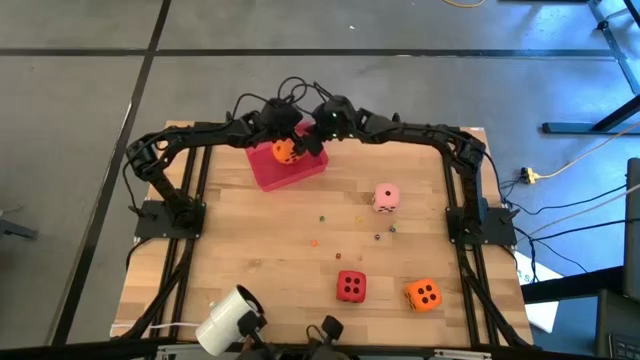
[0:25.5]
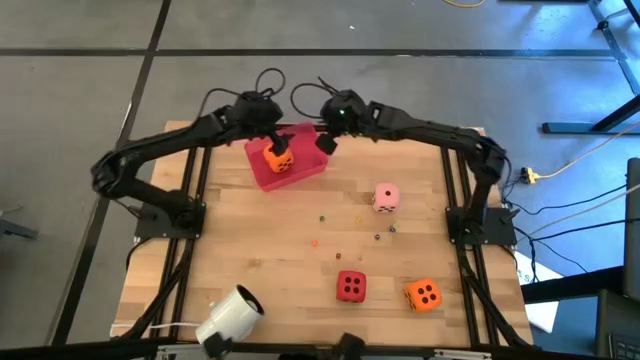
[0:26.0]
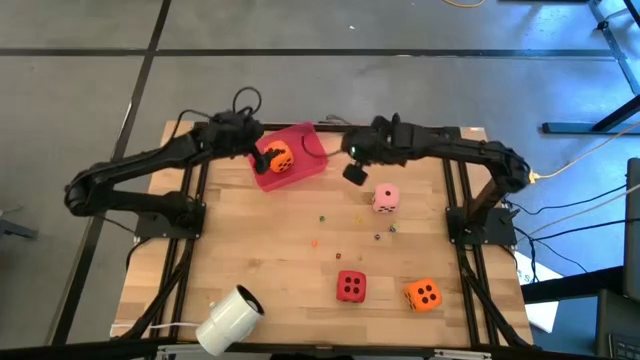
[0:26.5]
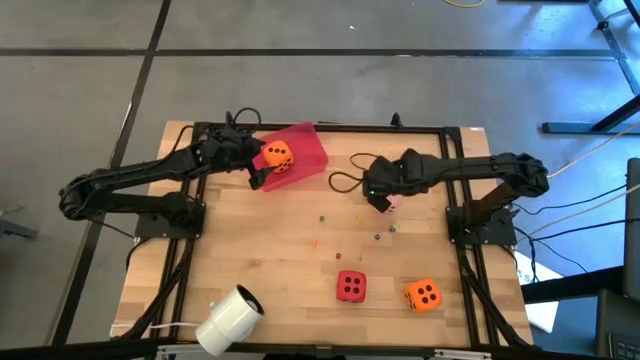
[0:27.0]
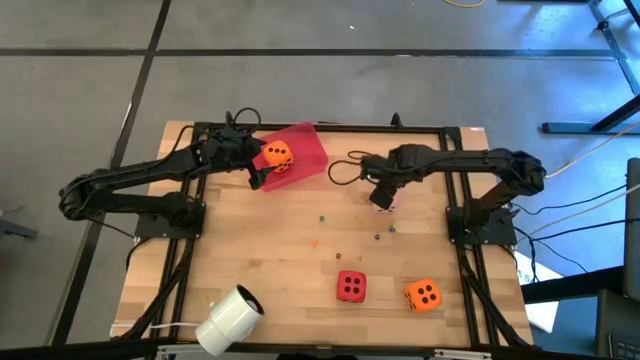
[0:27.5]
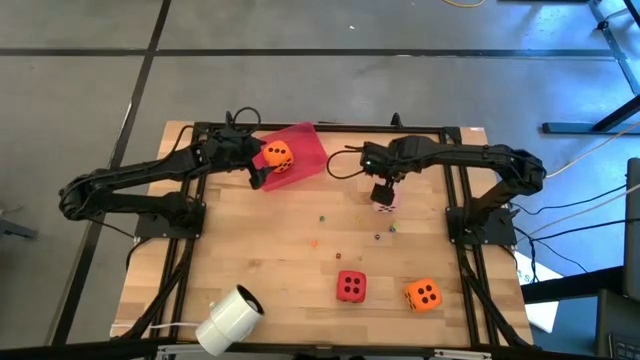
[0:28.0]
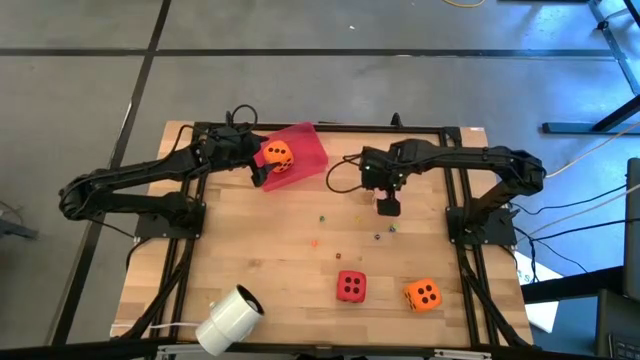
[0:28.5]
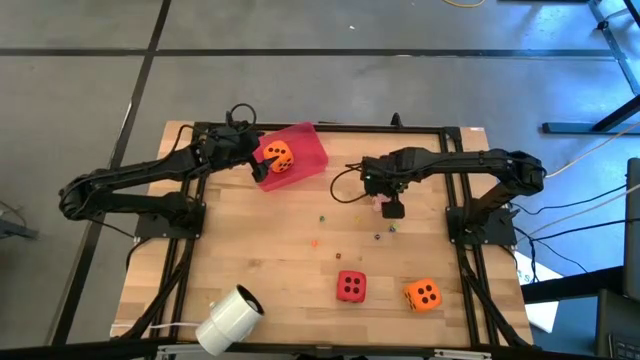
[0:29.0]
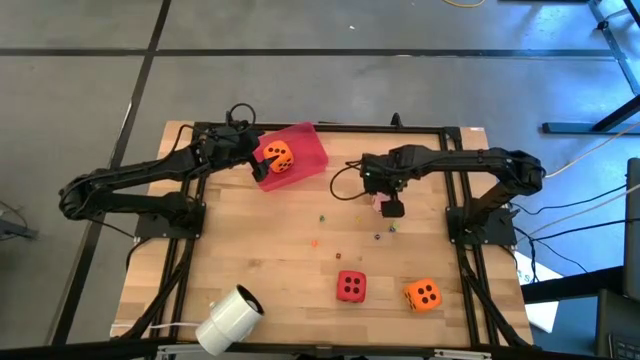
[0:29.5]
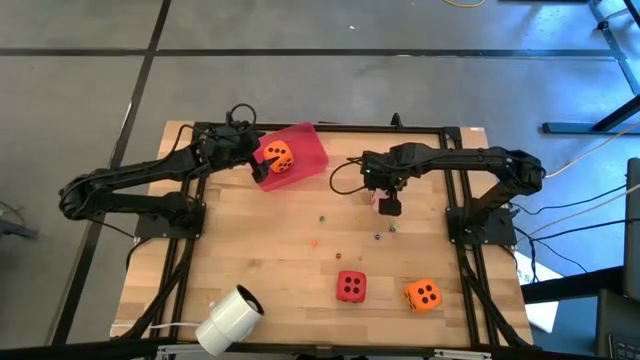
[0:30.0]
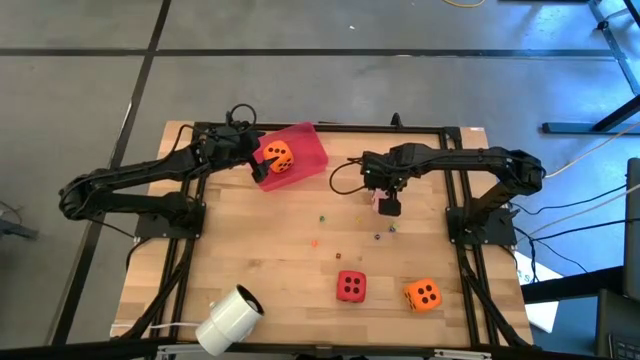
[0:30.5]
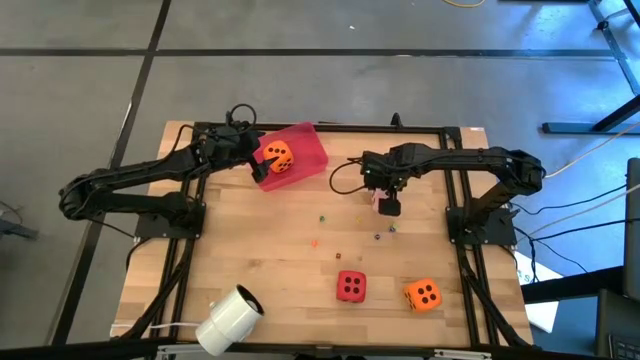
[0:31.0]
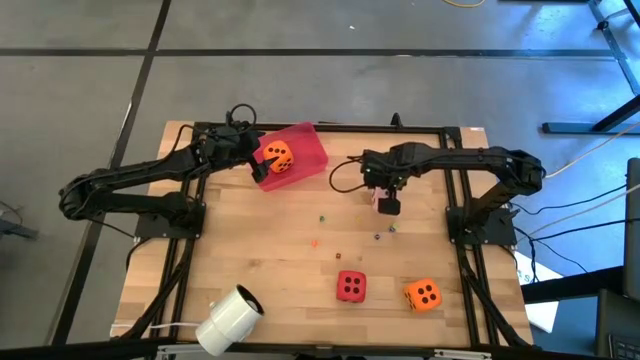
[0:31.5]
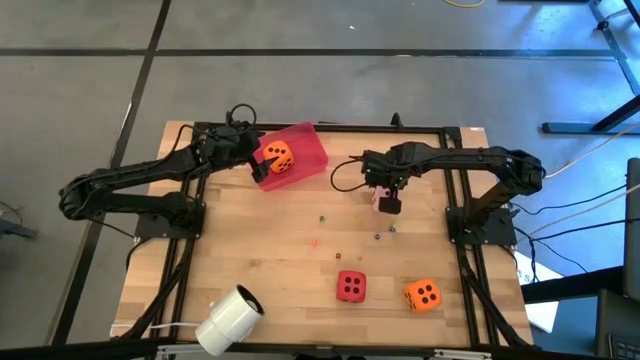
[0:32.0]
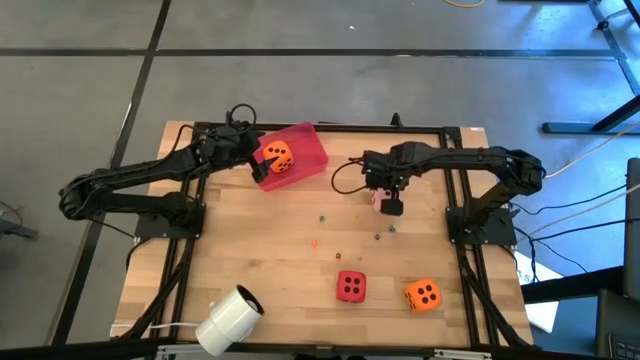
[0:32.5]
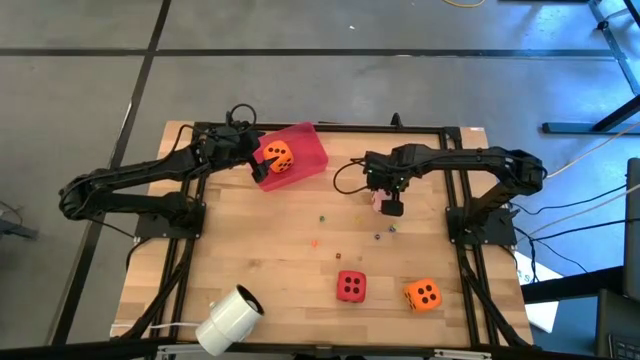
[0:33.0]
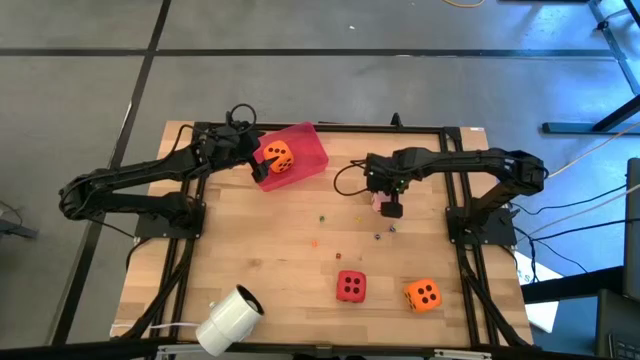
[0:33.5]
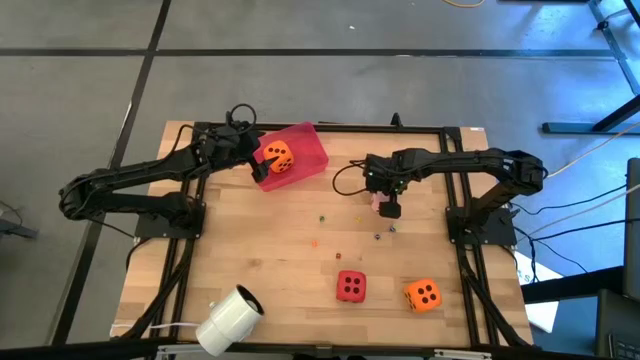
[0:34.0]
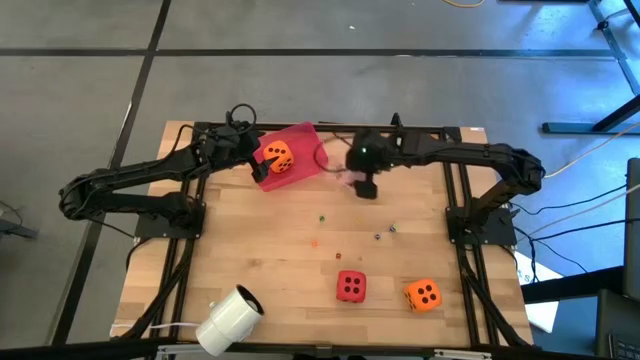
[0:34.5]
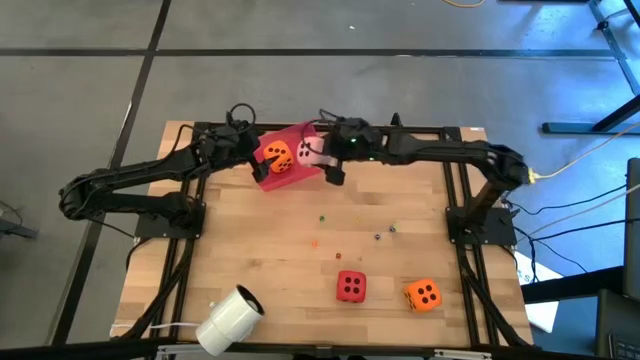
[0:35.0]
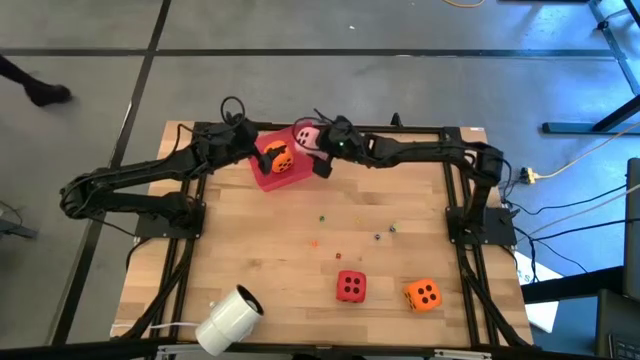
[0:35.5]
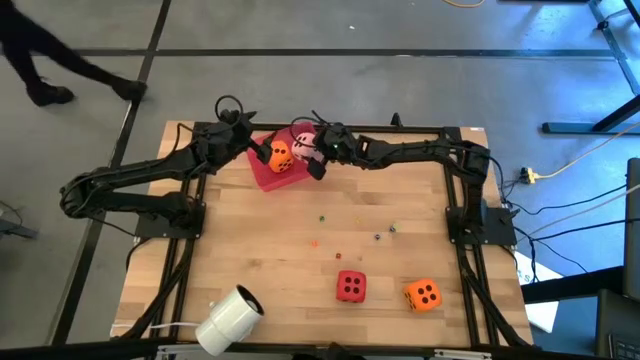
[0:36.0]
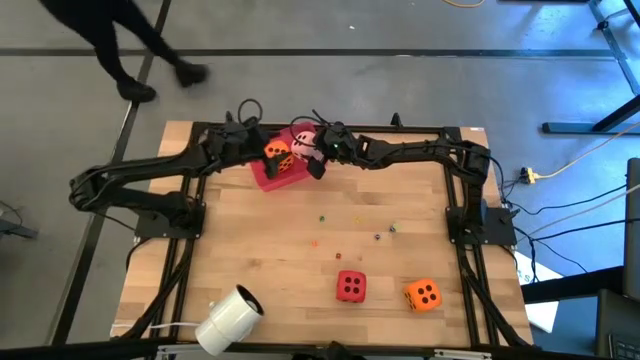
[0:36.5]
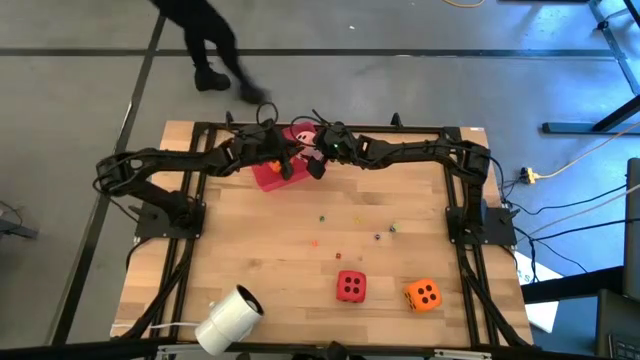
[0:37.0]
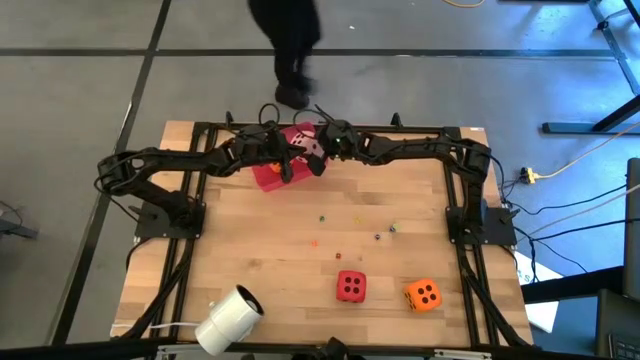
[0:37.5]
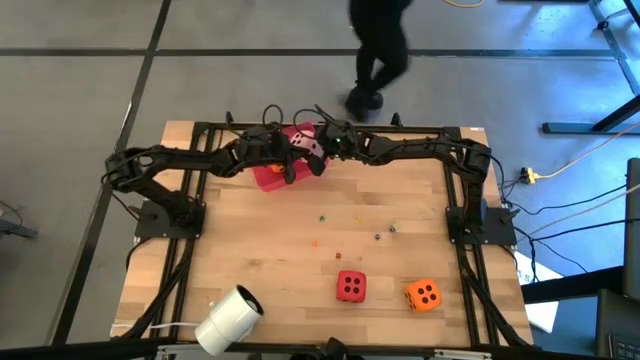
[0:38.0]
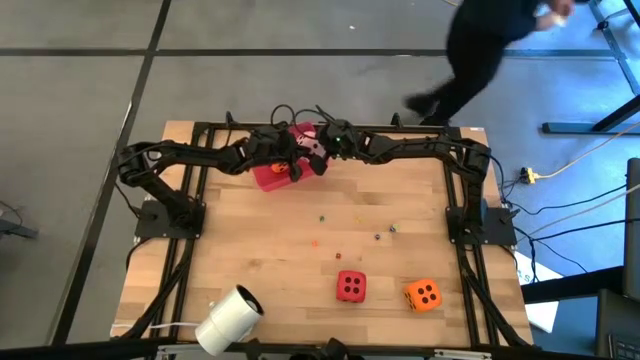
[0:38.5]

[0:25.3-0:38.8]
Task: Pick & Place Dice
Put the large pink die into the red bin

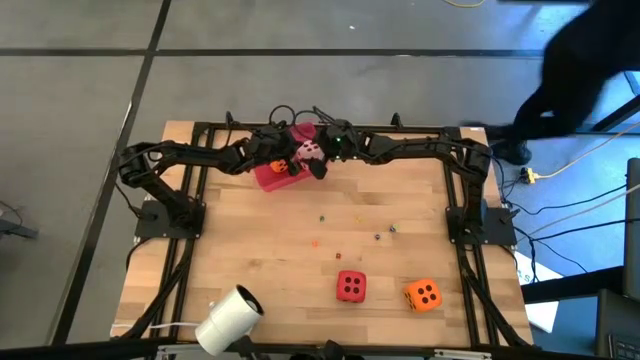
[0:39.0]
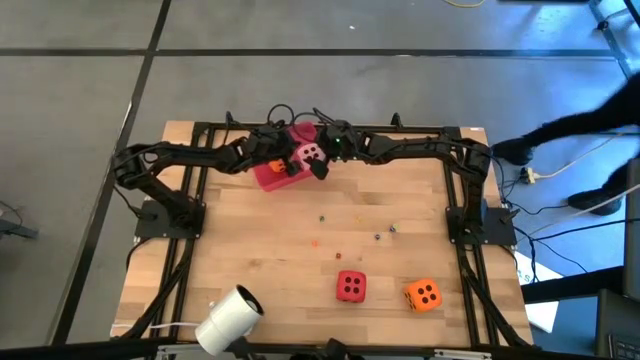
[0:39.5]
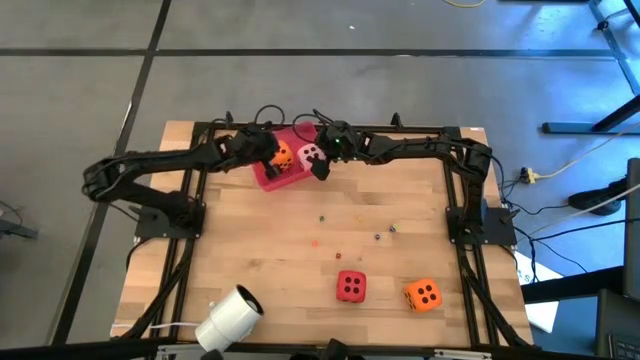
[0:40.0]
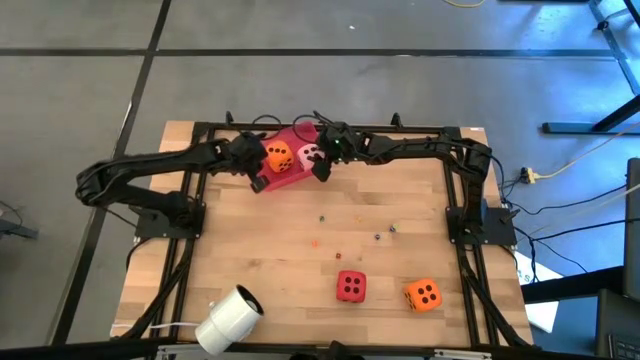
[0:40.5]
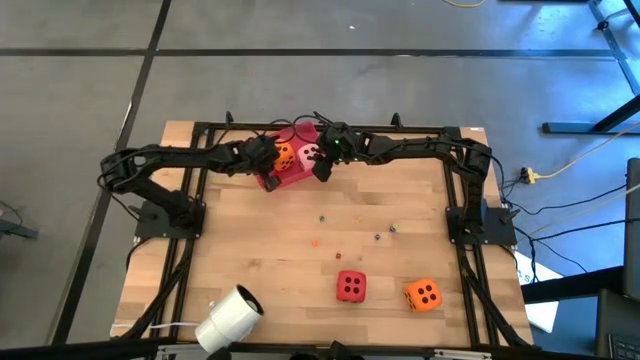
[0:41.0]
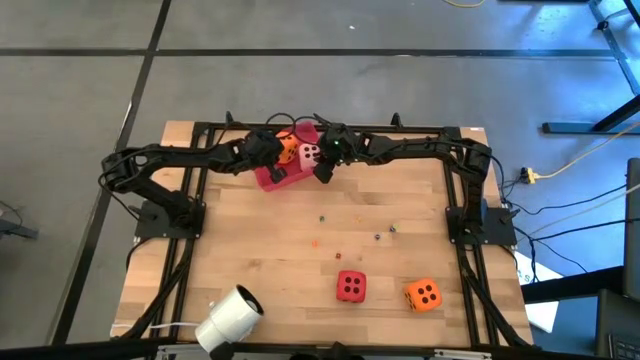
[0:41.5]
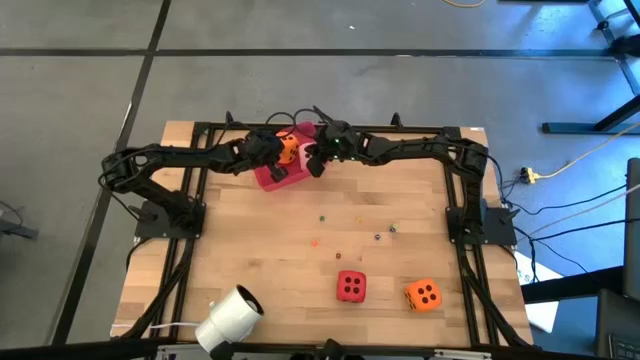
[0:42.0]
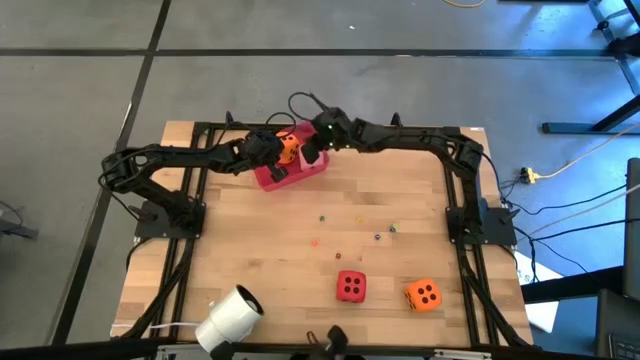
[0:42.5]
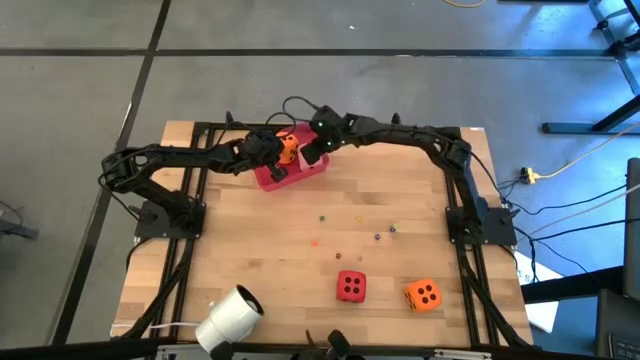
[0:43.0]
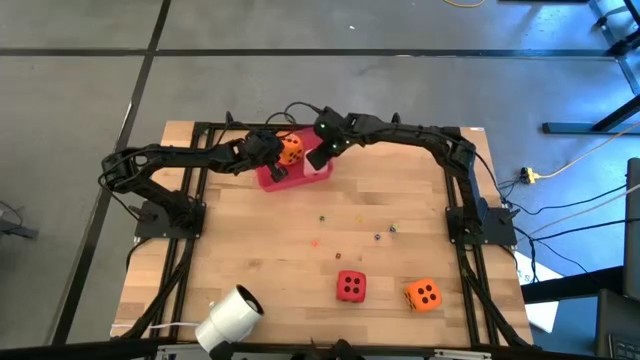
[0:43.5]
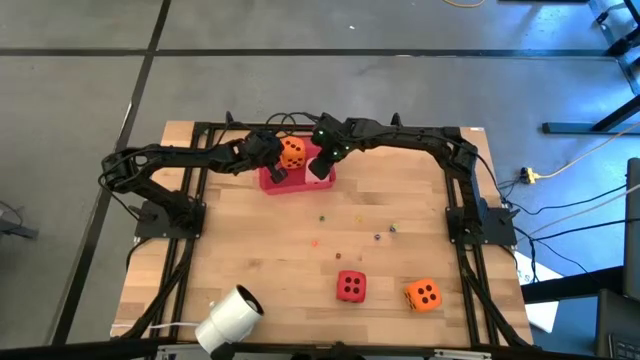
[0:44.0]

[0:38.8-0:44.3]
Adjust the large orange die in the red bin

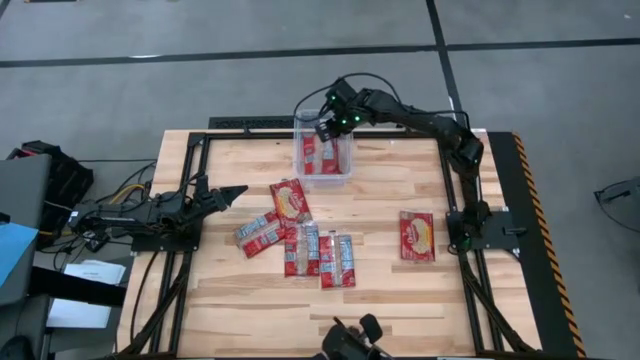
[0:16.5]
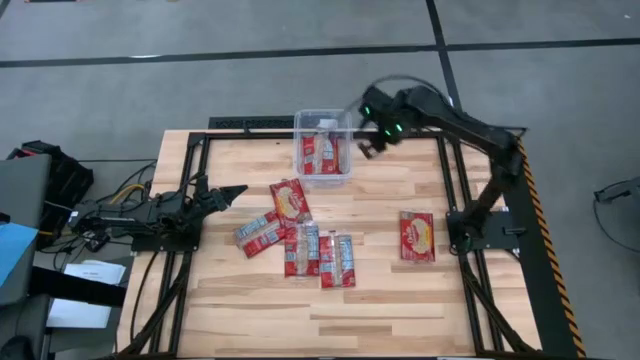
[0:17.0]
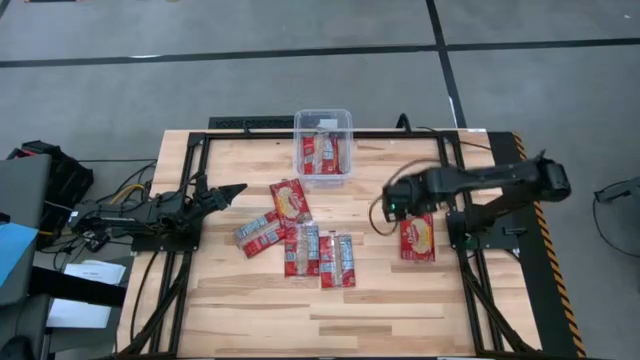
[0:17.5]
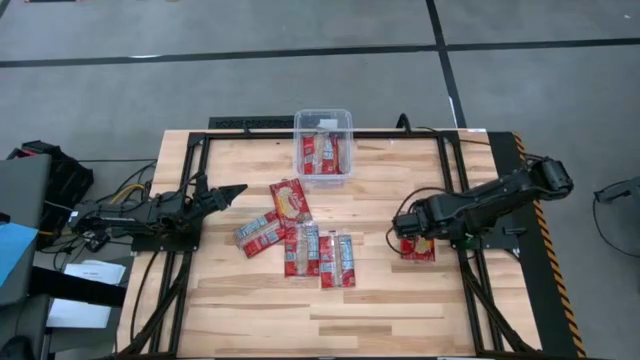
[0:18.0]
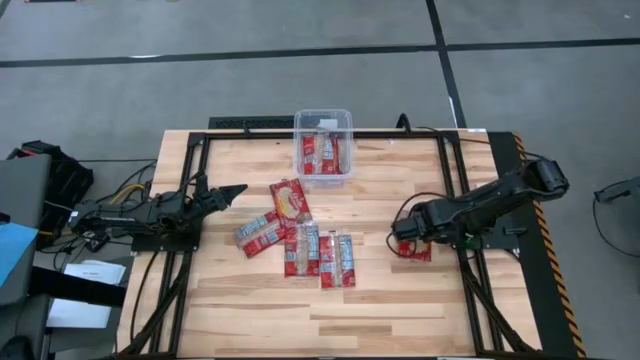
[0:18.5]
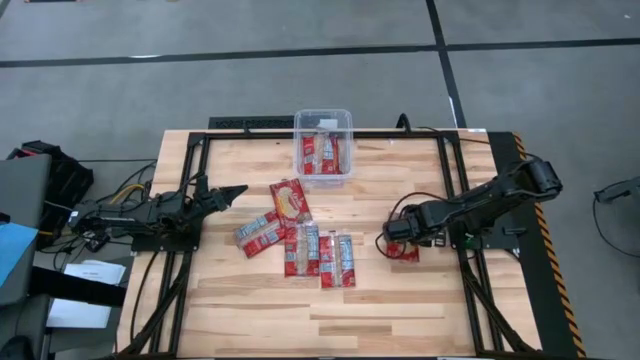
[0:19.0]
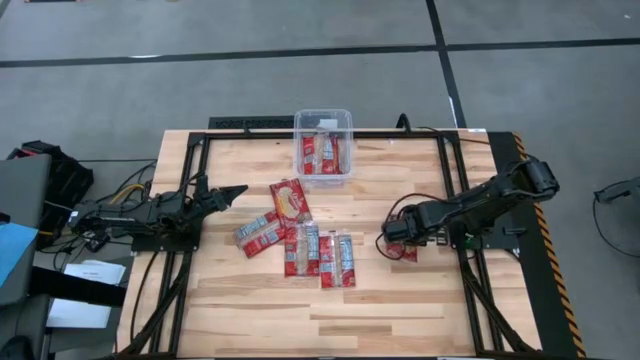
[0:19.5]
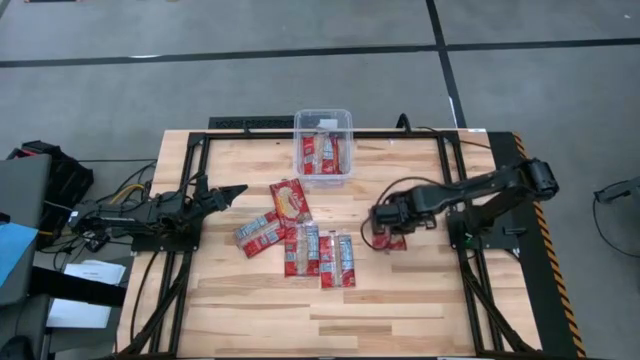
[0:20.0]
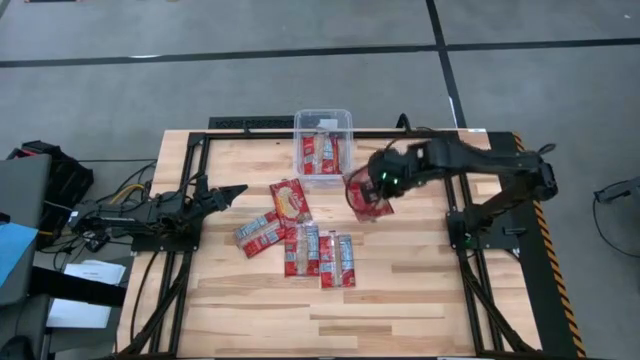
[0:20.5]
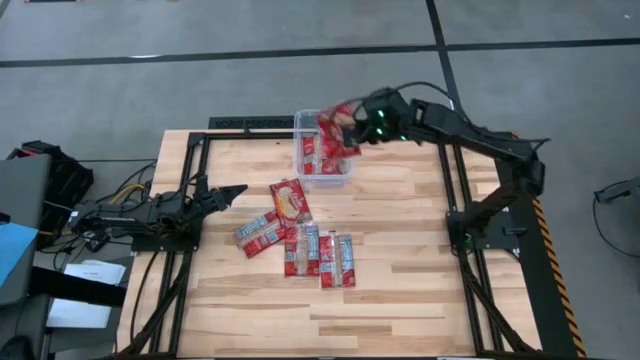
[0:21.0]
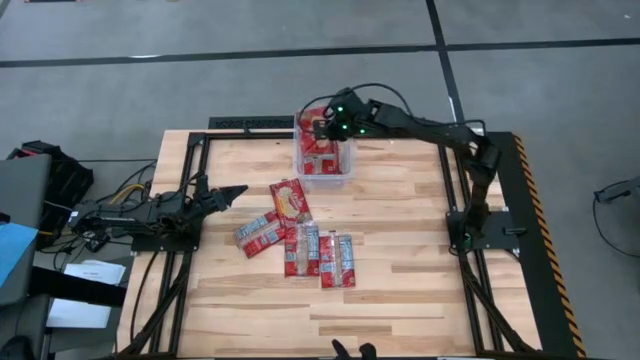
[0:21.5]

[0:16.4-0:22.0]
Task: Sort popcorn bags into baskets
Put the red popcorn bag into the transparent bin
